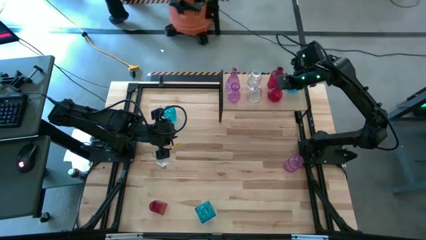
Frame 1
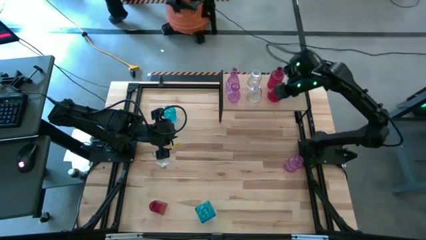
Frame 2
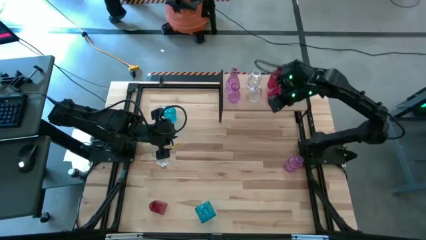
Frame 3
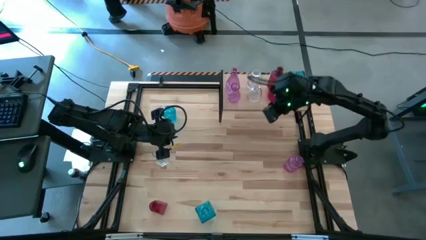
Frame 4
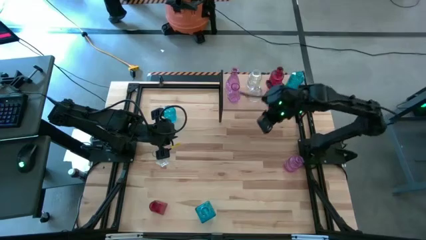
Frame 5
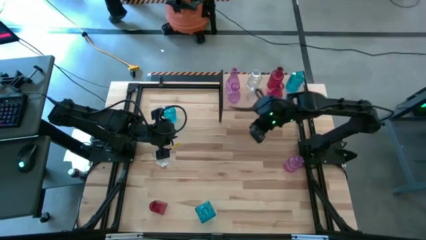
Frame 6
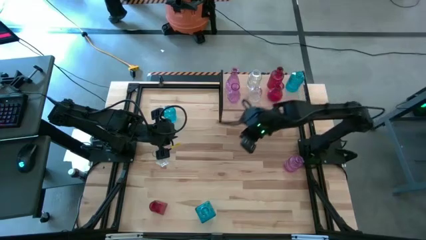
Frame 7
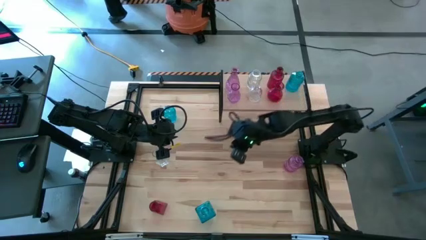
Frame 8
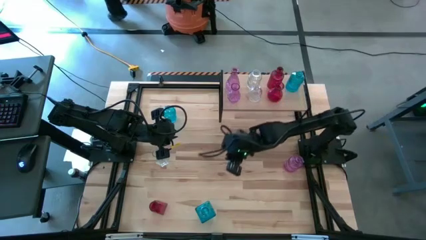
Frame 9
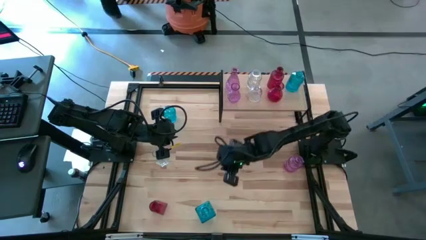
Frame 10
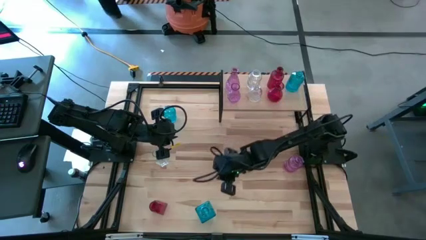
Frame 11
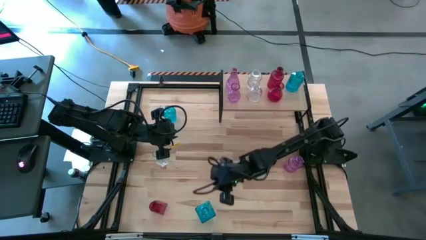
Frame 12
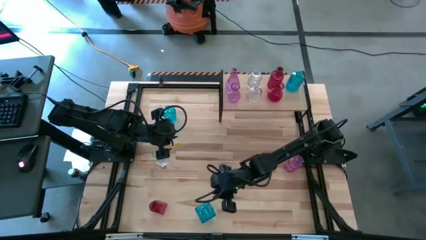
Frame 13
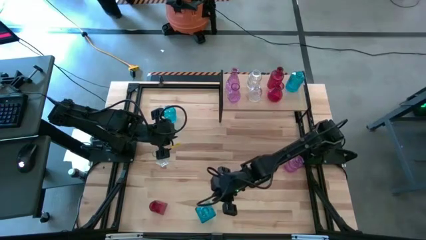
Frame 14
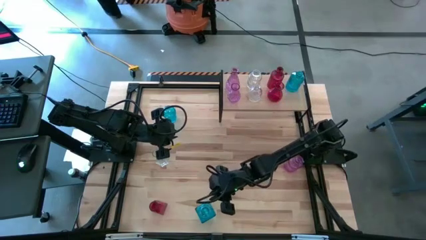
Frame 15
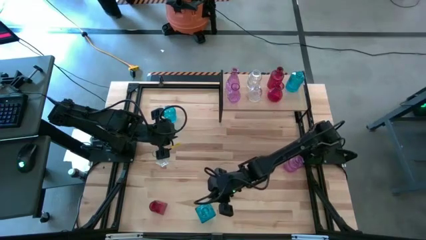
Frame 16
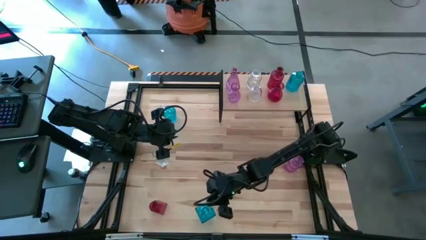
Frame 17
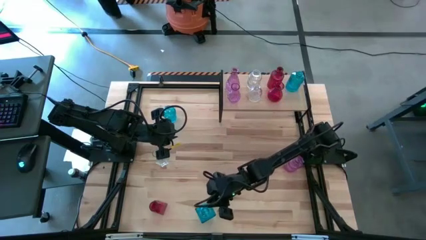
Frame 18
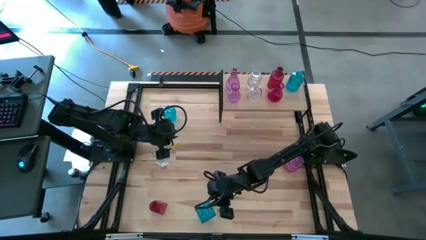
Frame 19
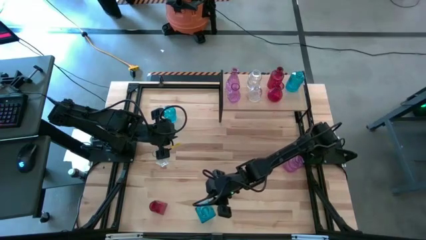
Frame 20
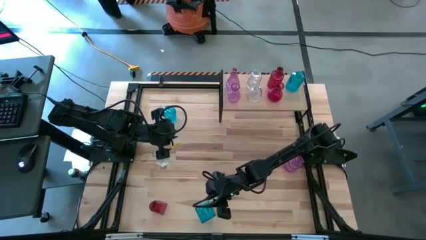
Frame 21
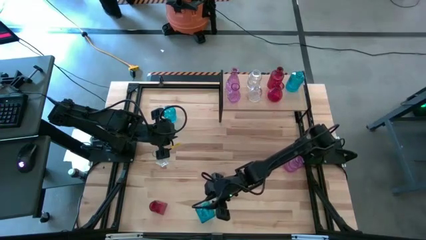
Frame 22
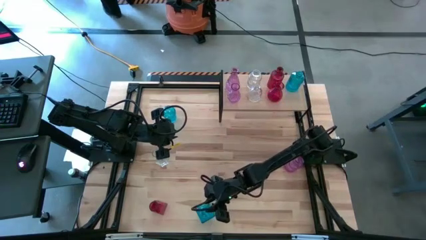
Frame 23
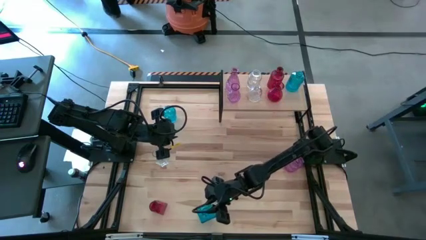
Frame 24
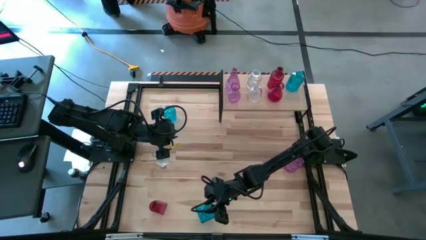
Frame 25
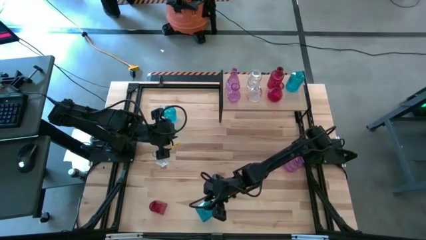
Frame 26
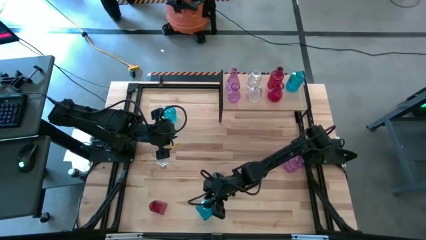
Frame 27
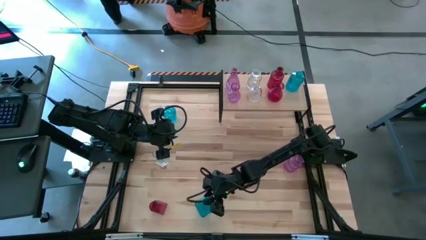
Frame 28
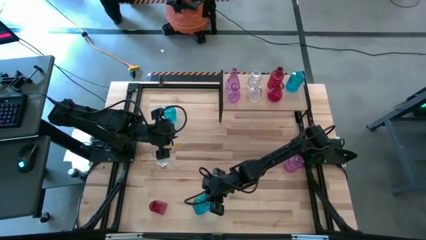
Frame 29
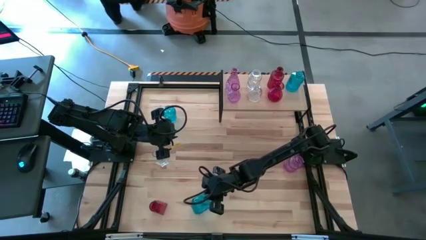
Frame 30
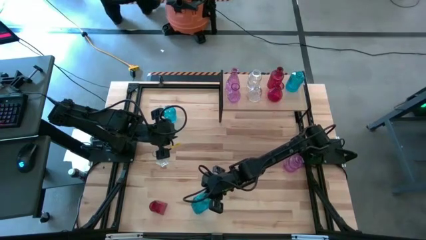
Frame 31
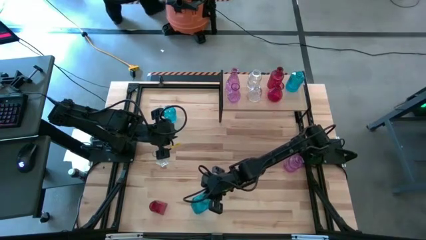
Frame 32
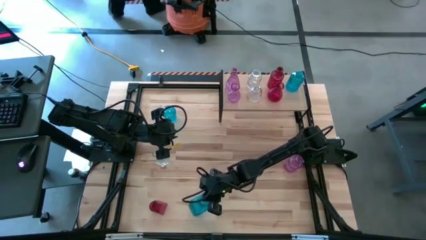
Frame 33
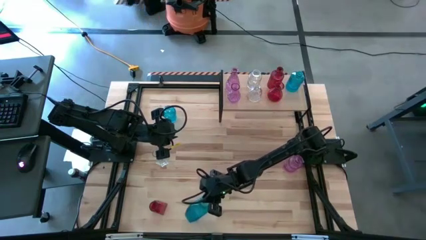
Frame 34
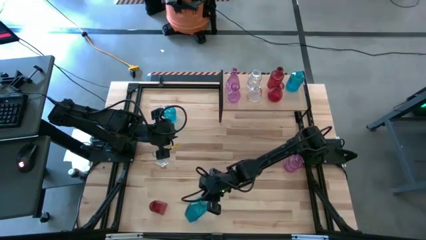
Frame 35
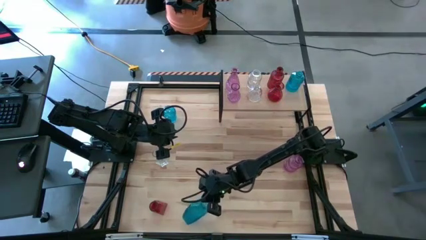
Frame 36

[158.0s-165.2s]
Task: sort vases onto shelf
Put the bottom blue vase on the shelf aligned with the other blue vase

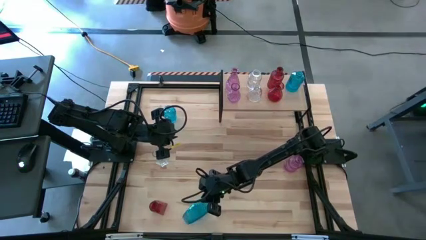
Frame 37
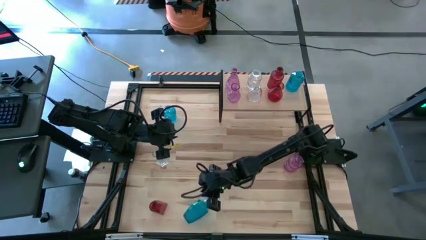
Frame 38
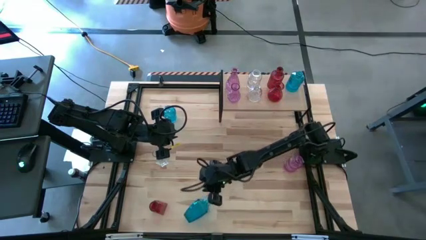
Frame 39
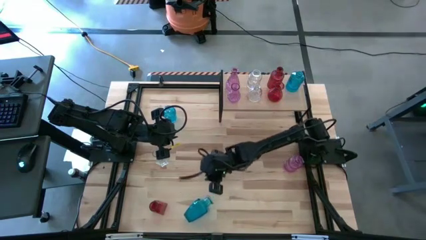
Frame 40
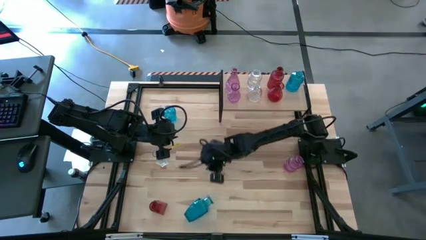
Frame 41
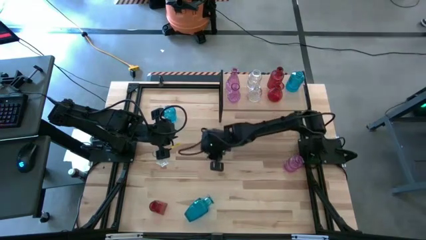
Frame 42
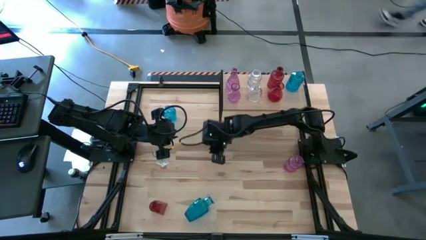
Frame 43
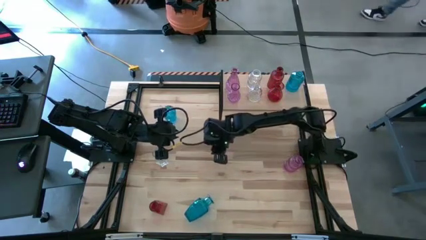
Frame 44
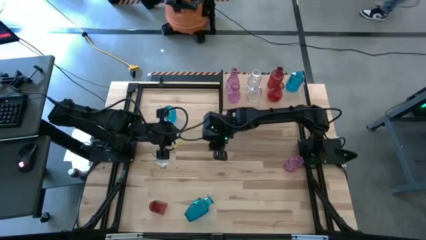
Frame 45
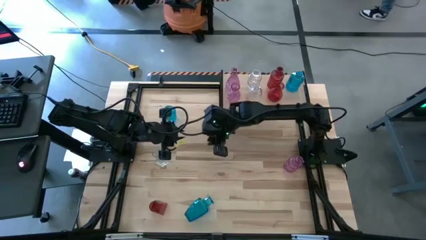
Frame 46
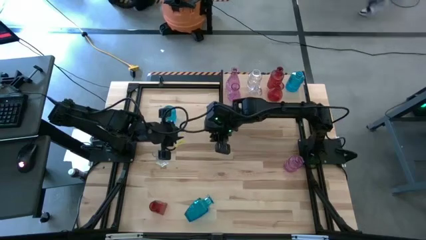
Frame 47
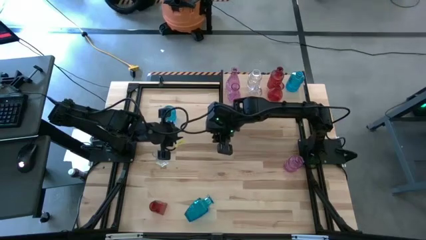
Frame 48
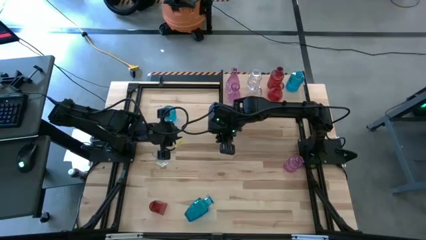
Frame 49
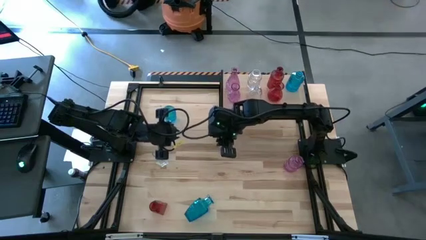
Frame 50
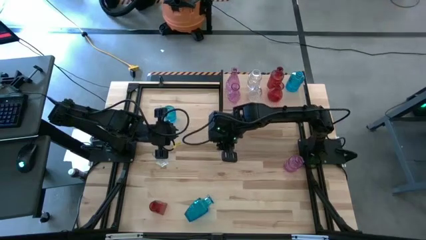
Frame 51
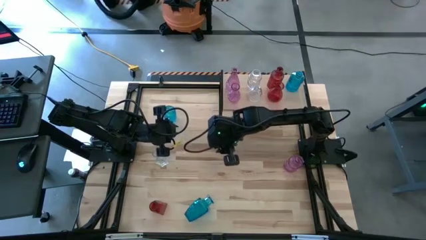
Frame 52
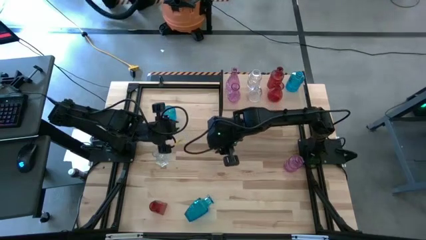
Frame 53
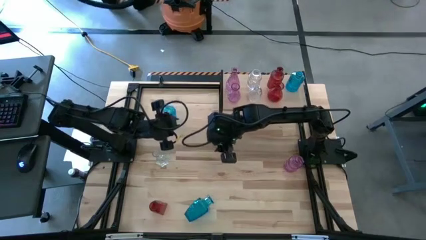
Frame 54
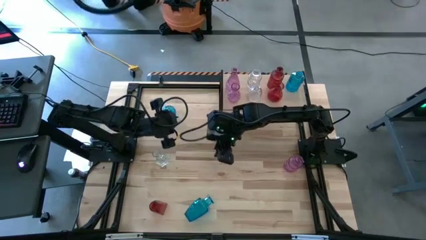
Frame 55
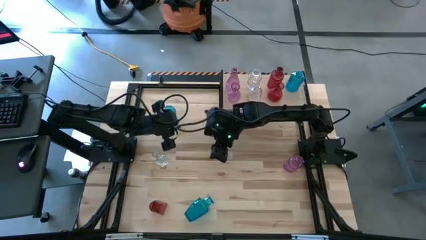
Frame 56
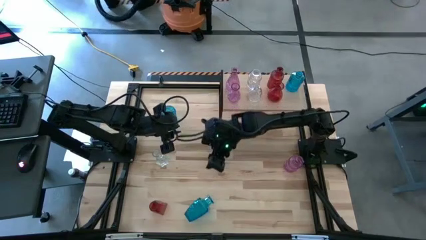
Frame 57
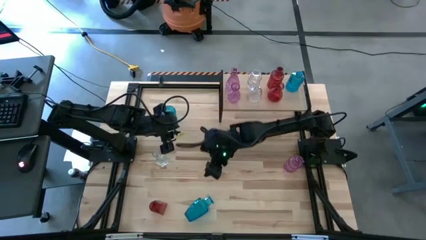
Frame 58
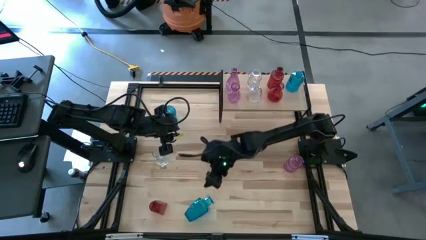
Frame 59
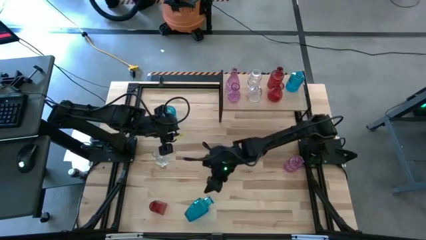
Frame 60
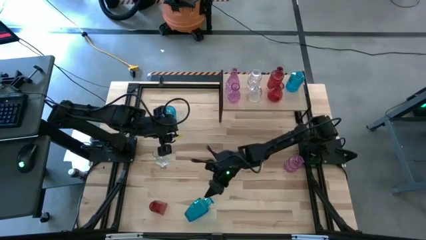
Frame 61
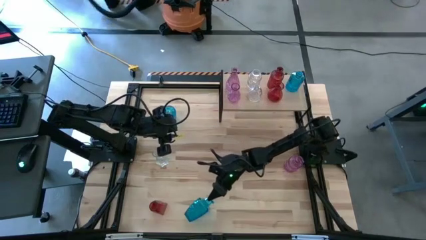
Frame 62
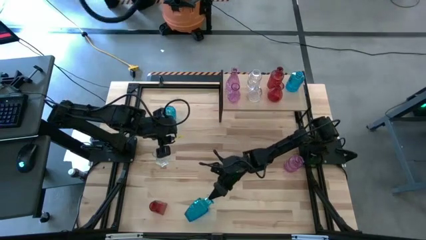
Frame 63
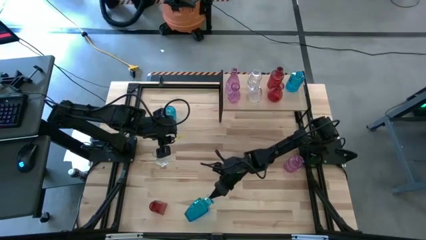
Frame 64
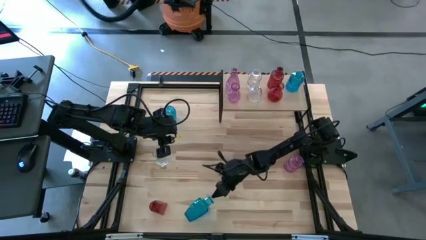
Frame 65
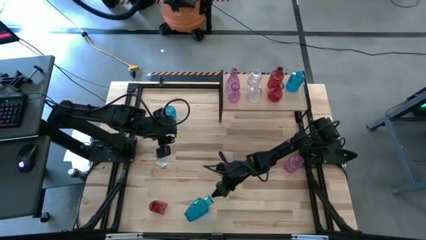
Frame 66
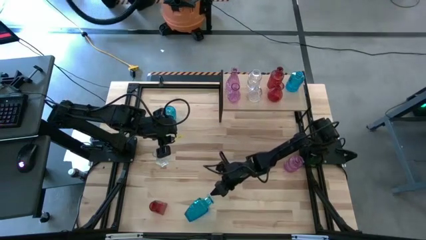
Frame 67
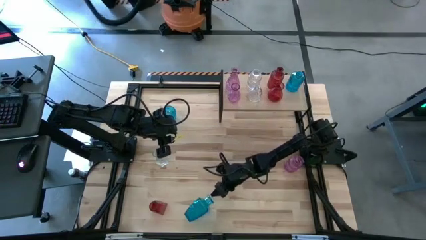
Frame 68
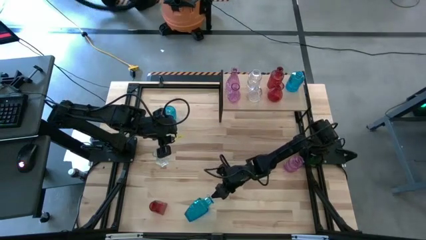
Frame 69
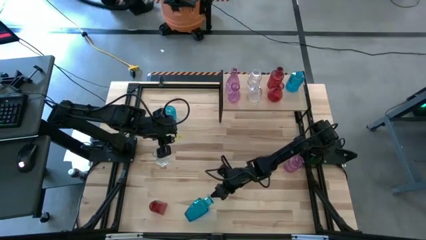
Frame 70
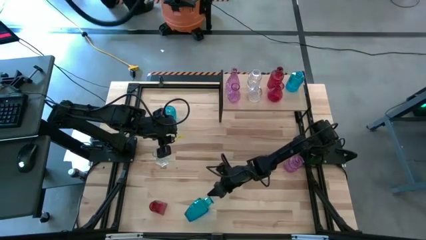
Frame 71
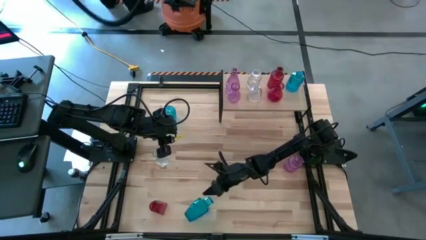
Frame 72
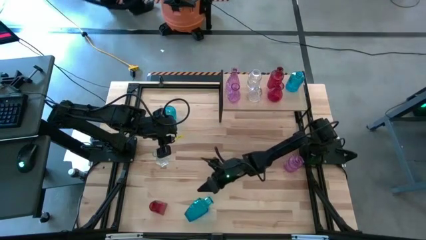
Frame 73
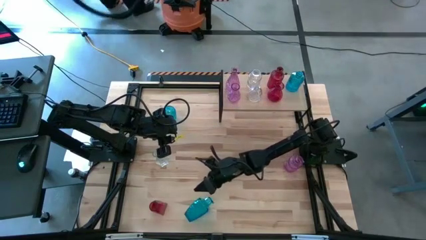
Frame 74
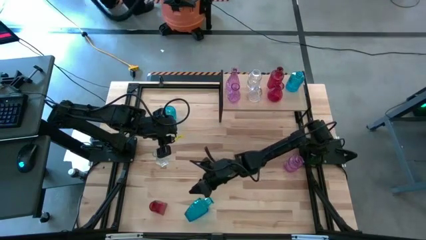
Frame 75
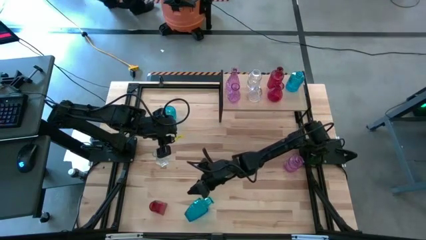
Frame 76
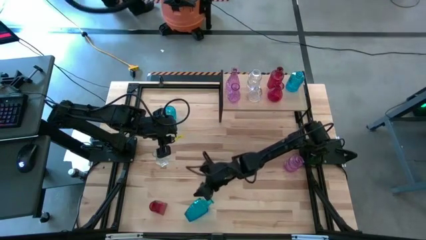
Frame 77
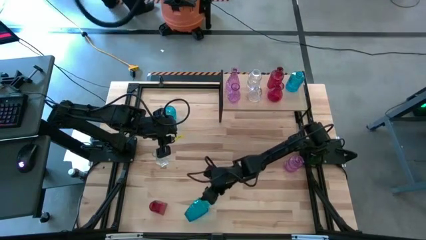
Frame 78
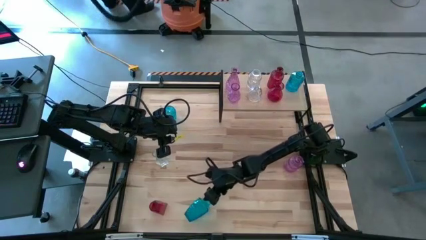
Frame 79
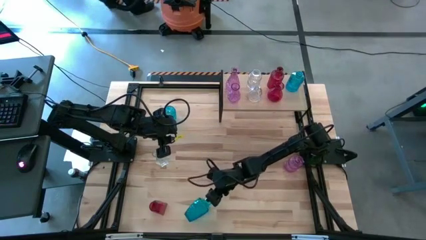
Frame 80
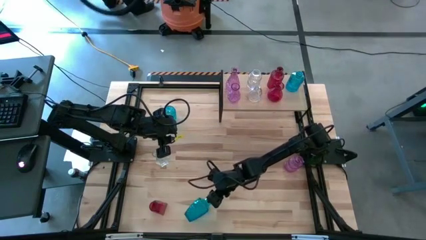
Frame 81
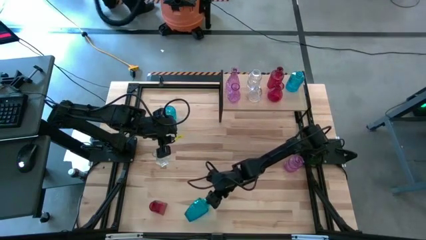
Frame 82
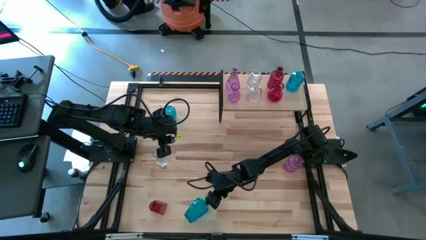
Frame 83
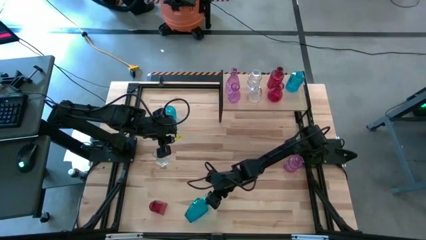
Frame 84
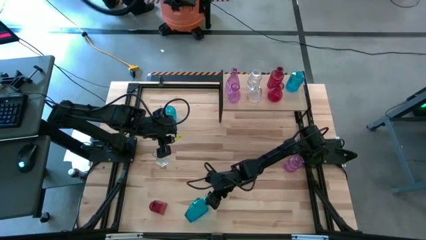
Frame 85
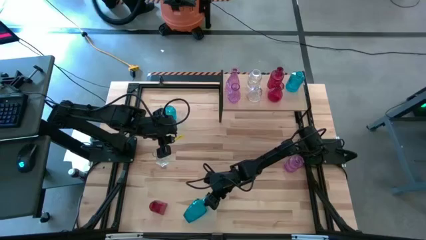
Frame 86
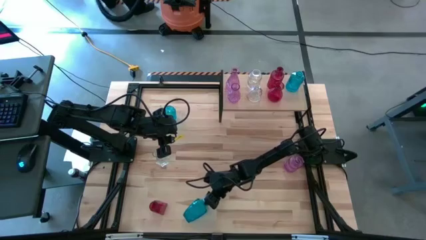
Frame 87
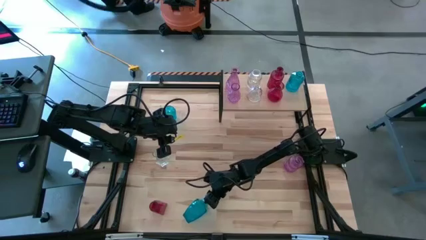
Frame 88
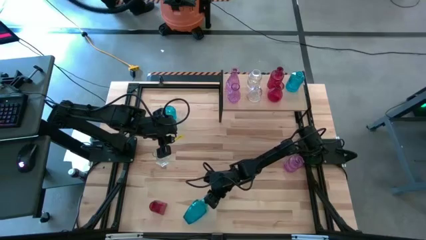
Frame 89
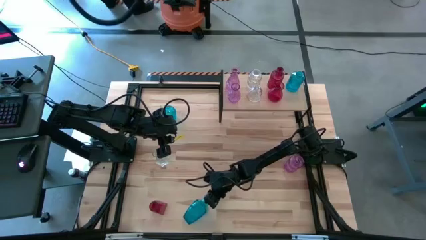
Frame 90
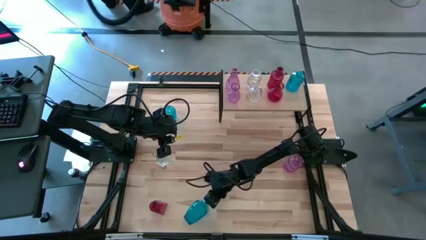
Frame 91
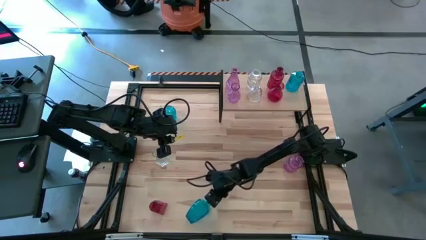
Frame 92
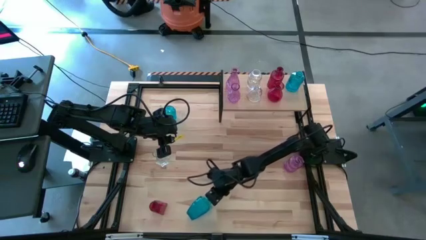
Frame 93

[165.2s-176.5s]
Put the bottom blue vase on the shelf aligned with the other blue vase
